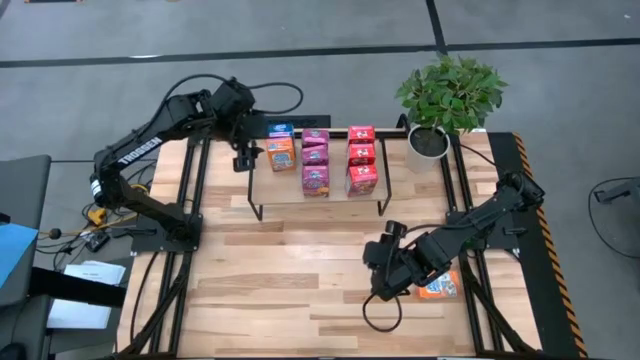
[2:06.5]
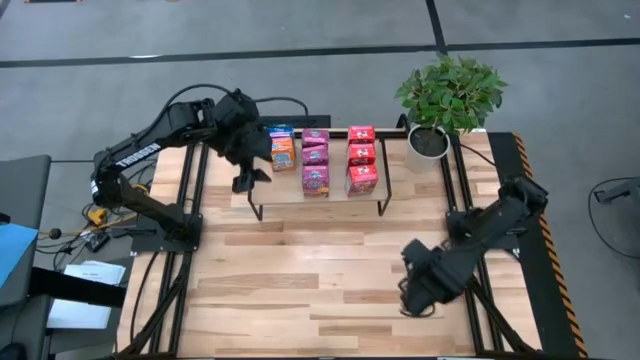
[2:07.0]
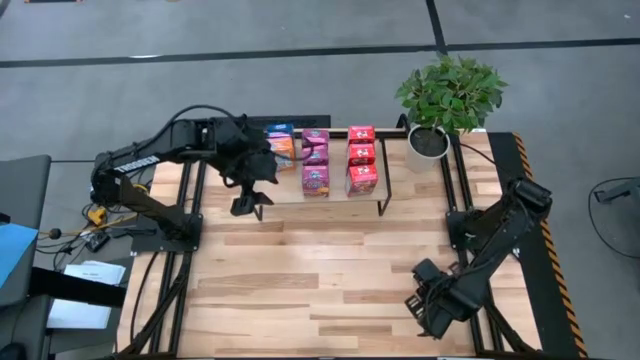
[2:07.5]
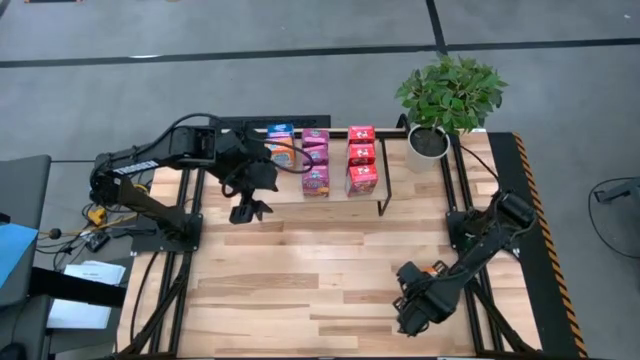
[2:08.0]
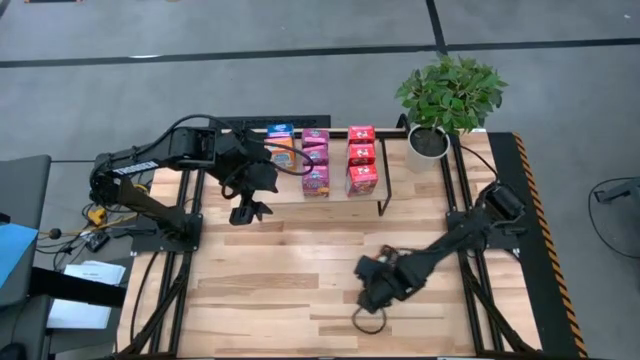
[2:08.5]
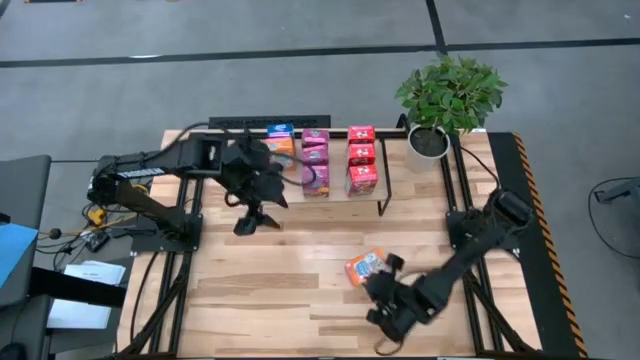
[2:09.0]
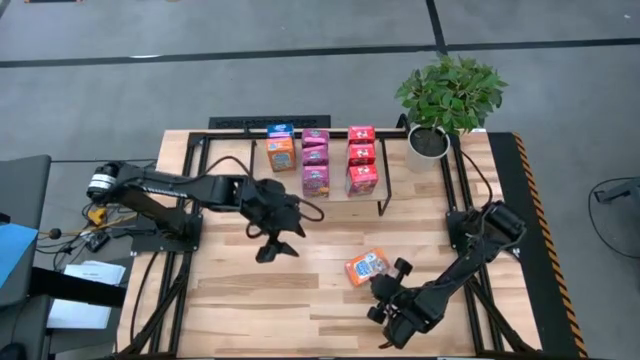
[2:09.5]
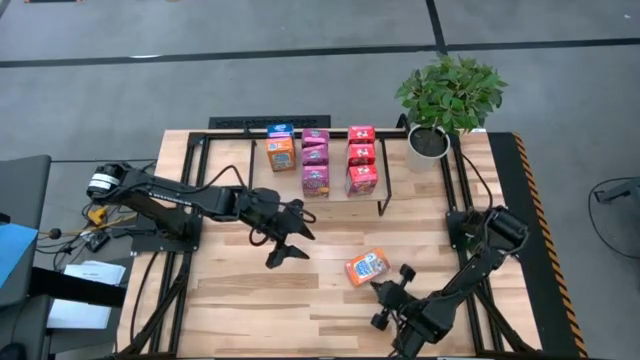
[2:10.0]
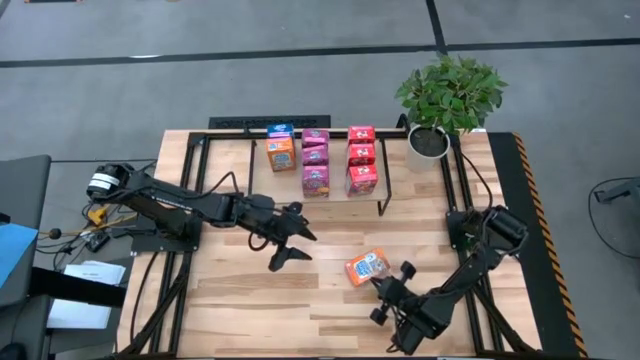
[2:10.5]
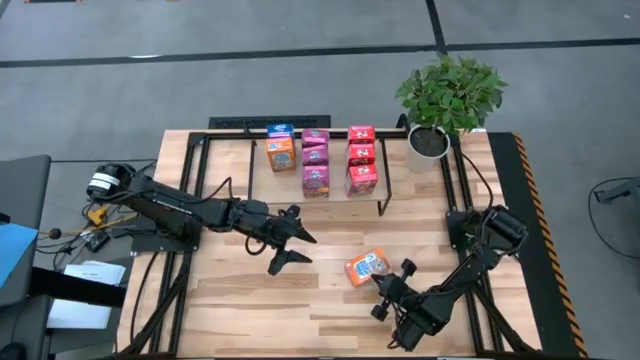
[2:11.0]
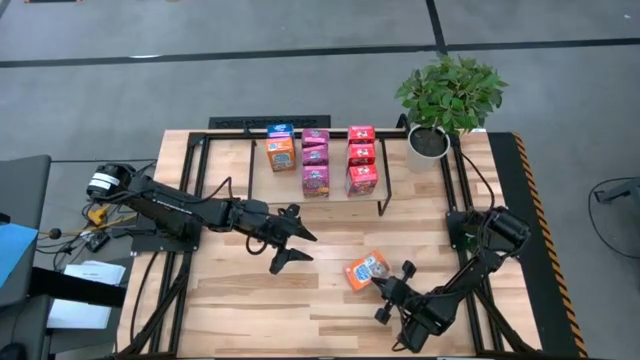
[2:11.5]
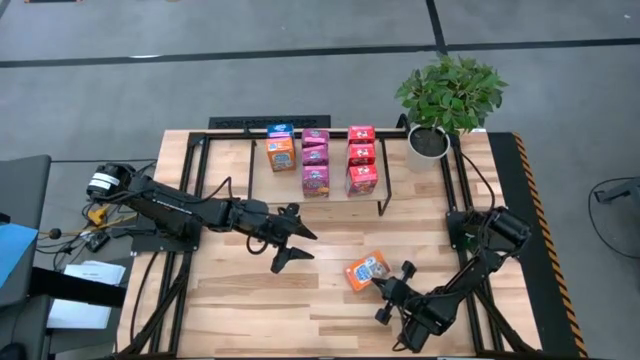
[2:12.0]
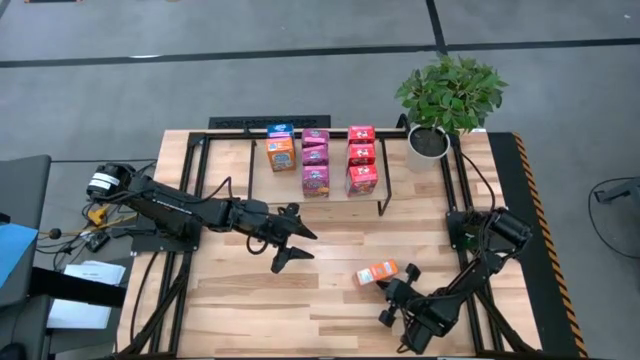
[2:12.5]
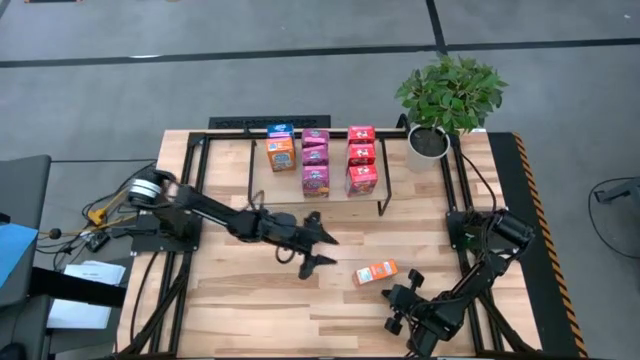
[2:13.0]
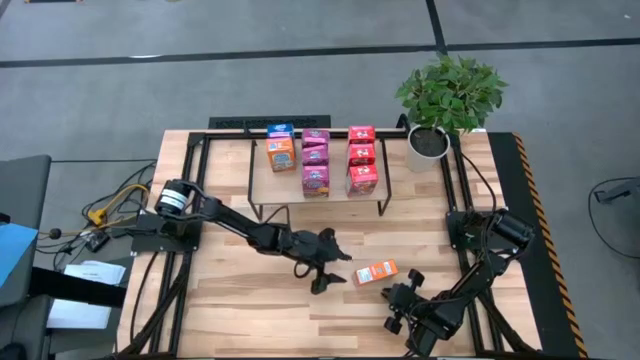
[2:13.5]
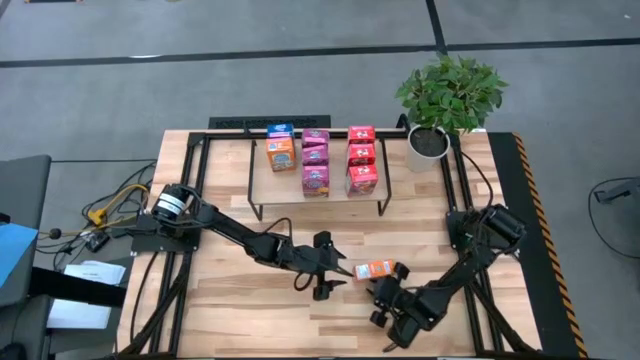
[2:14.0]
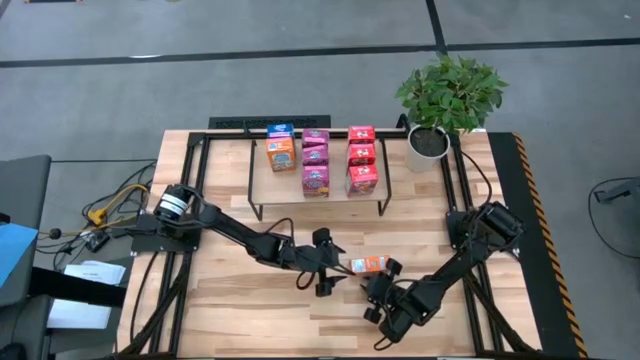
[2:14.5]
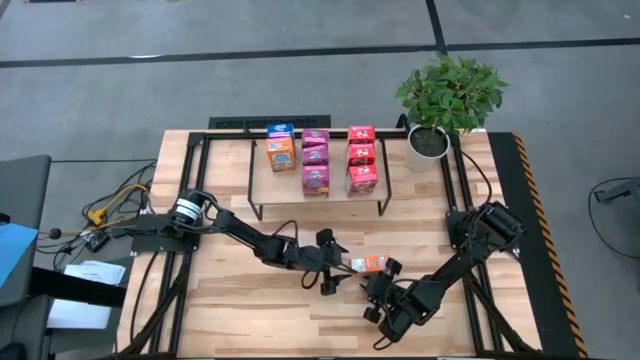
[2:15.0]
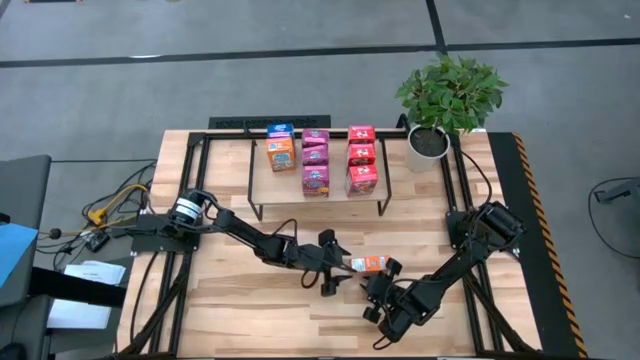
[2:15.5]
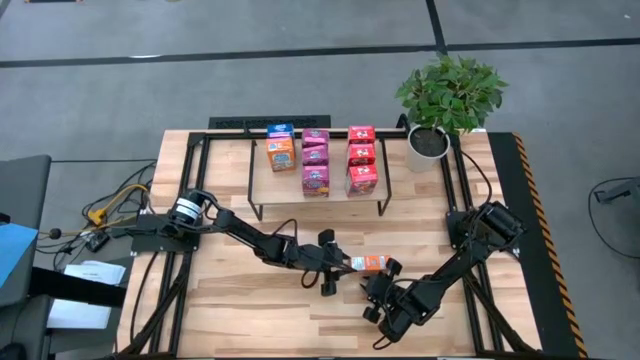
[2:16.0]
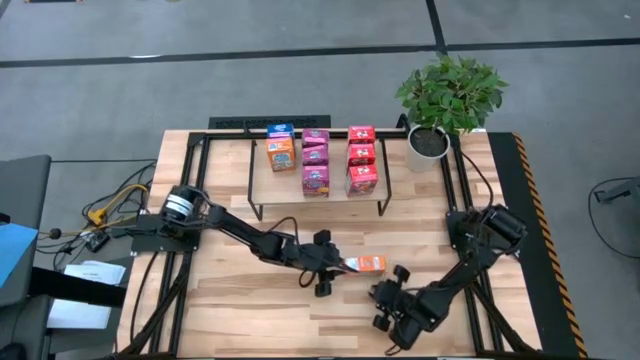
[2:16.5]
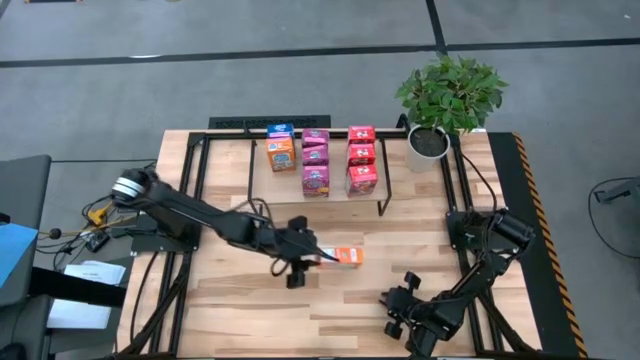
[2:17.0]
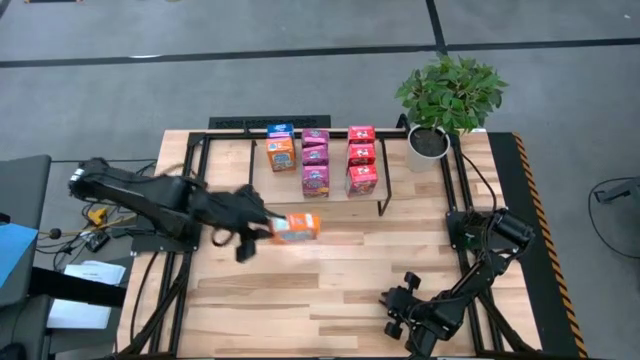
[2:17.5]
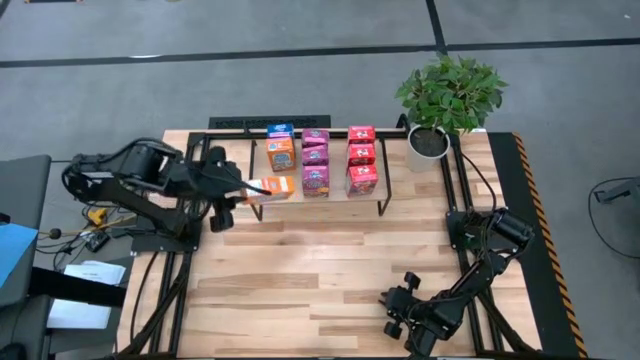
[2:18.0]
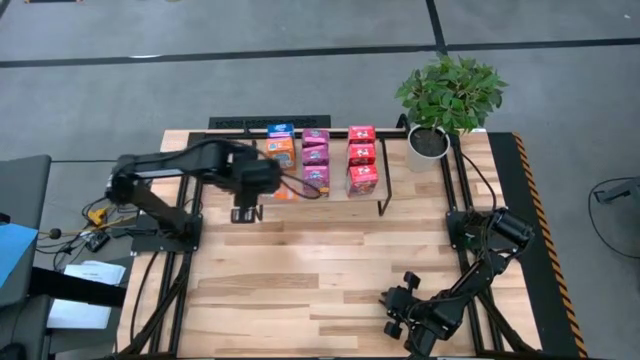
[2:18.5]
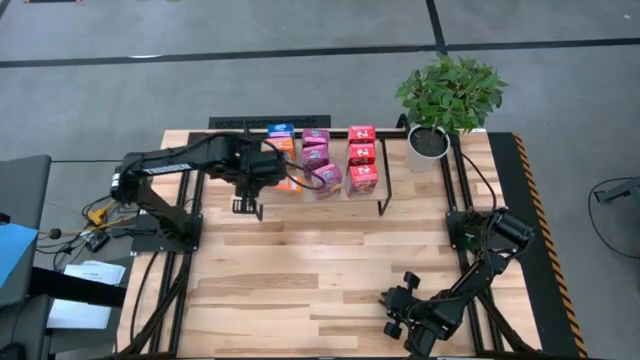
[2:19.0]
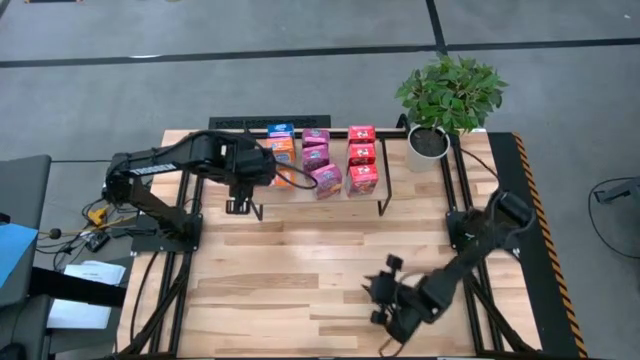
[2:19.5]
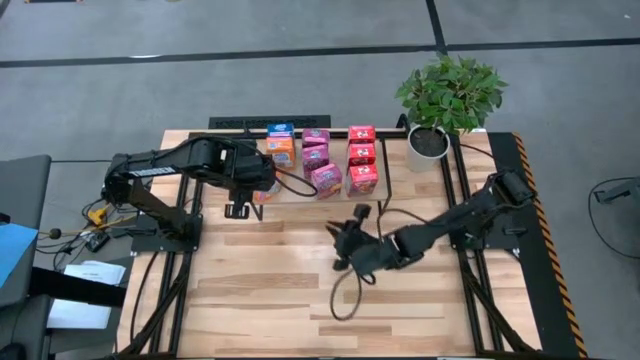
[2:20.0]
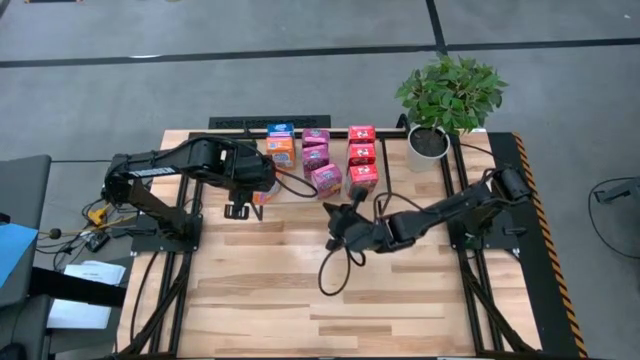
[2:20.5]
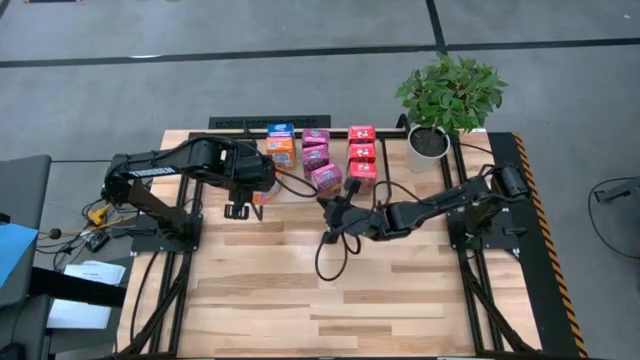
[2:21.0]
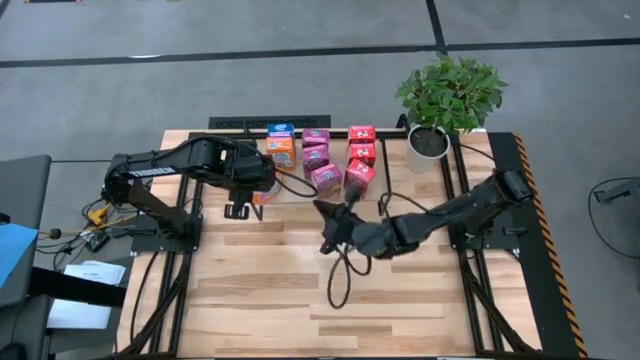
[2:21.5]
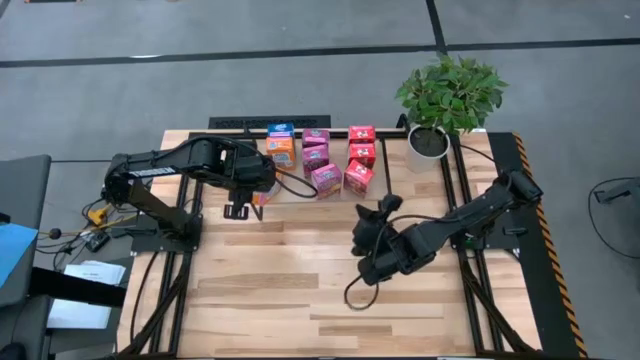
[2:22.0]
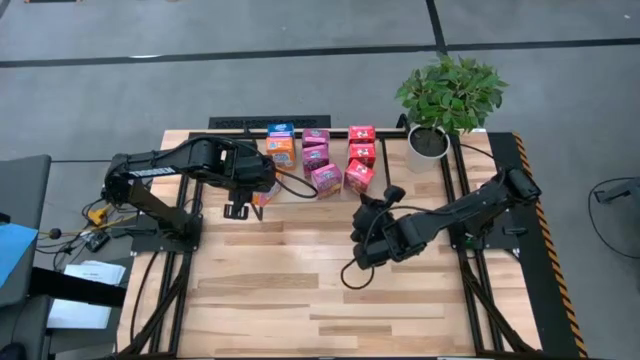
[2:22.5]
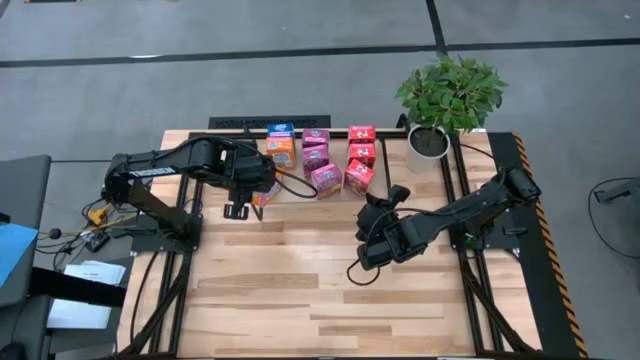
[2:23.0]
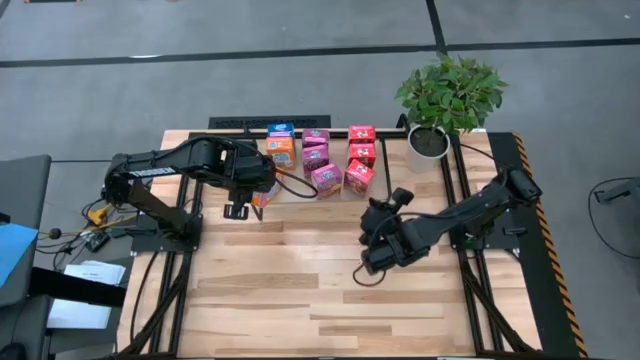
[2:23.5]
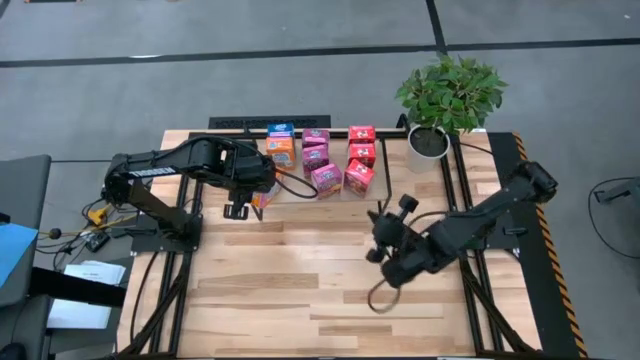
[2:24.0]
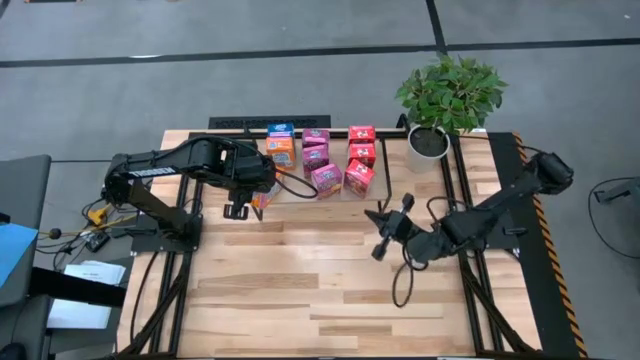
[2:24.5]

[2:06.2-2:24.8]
Task: Stack cereal on shelf
Put the orange cereal box on the shelf aligned with the other orange cereal box

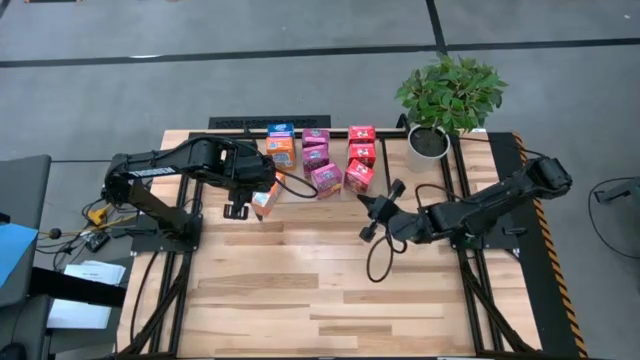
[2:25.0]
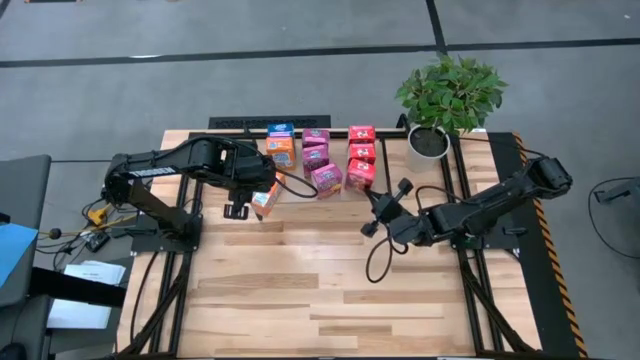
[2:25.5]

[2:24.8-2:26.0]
Adjust the red cereal box on the shelf

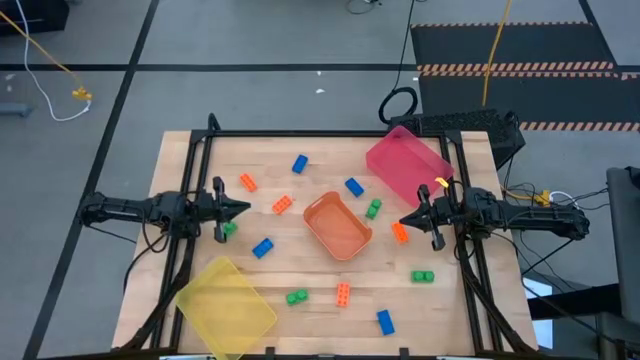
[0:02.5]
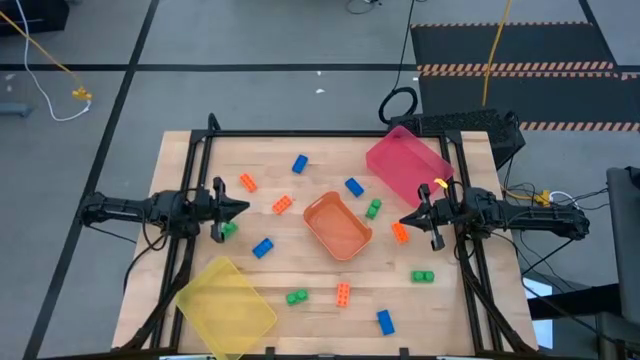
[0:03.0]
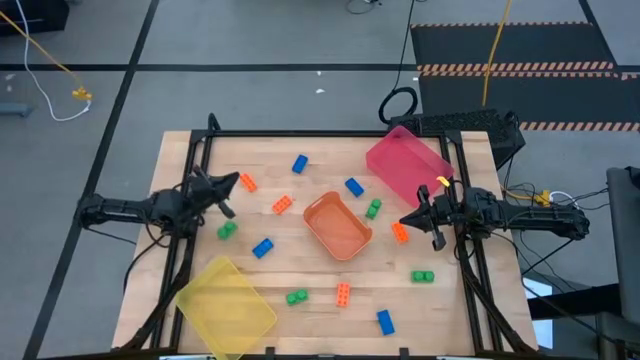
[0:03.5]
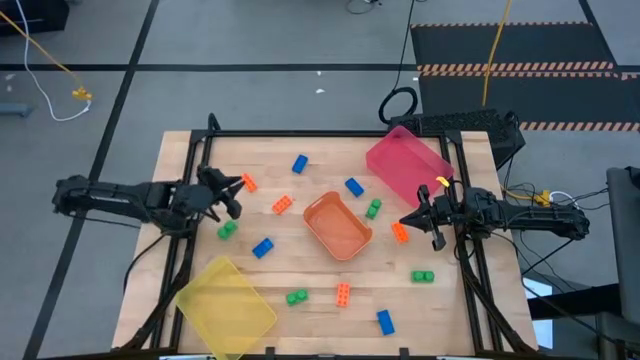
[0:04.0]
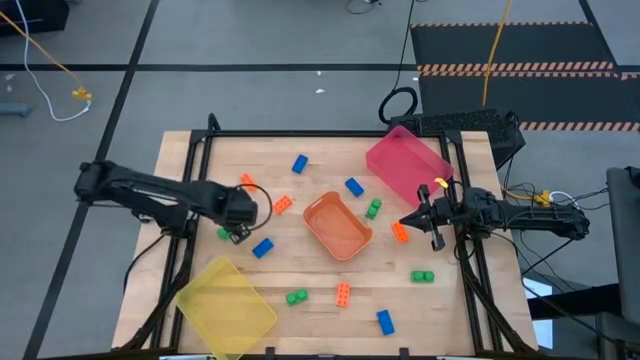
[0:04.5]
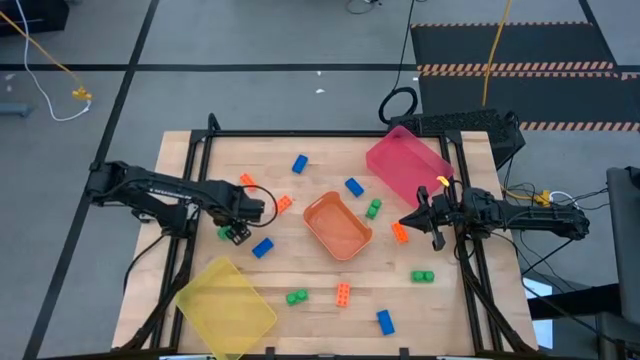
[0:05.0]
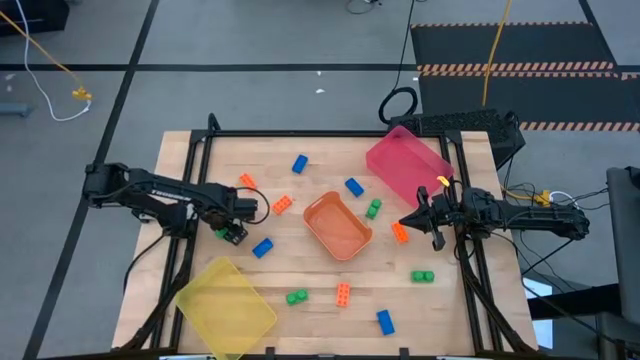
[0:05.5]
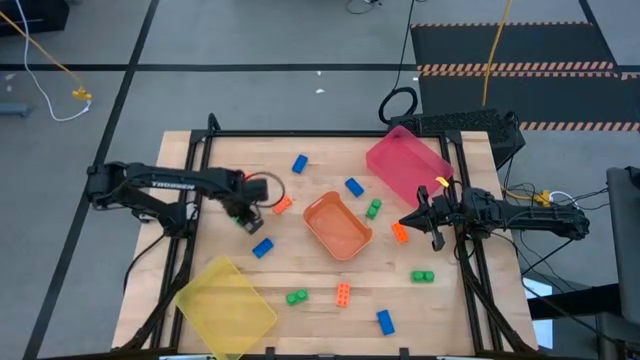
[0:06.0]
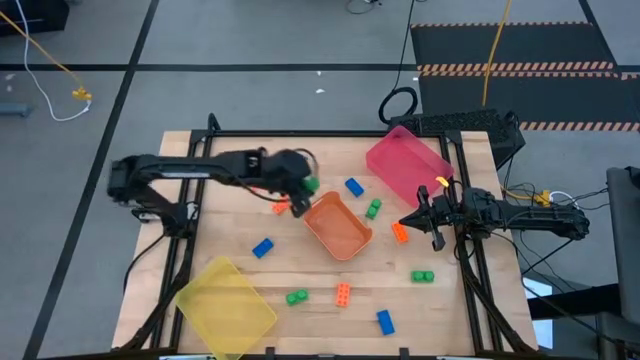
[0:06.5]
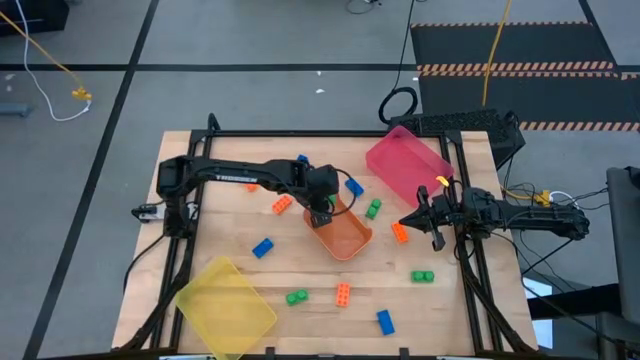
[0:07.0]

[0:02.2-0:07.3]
Task: Sort & place blocks by color
Put the green game piece into the orange bin
